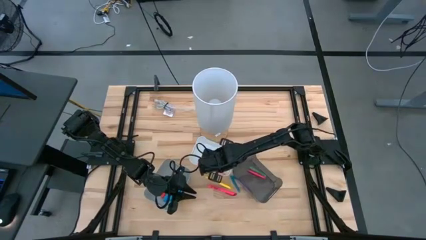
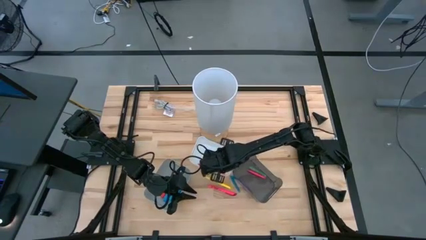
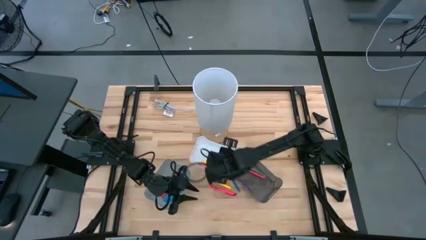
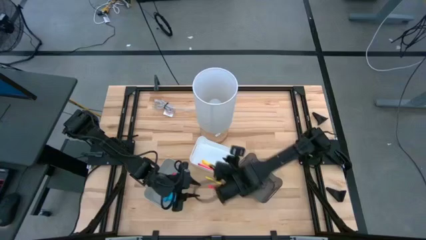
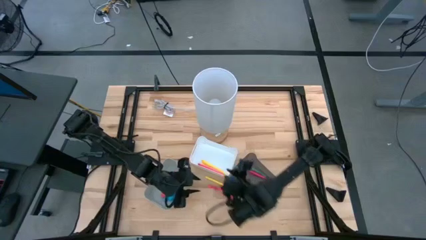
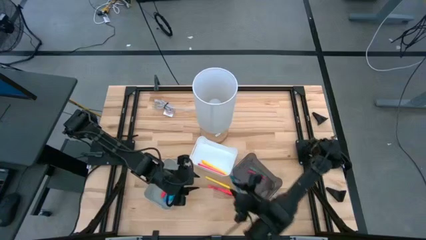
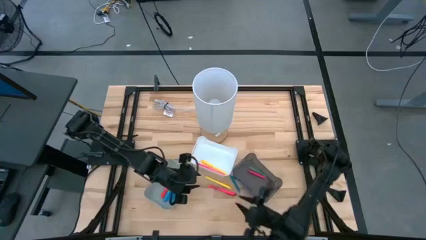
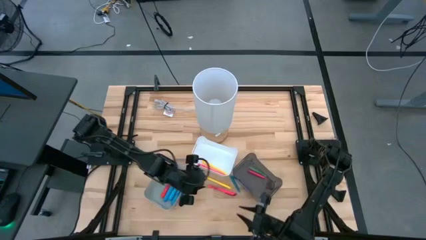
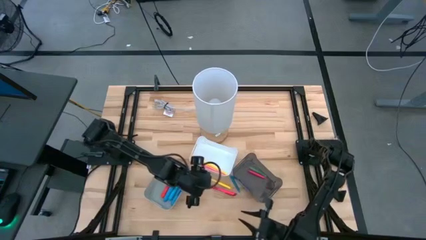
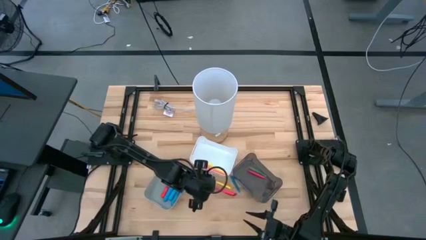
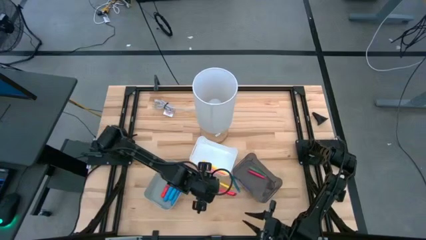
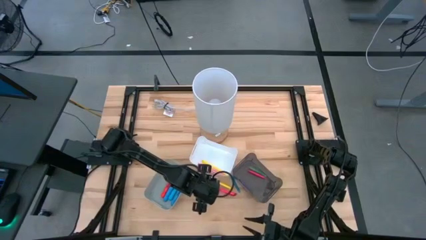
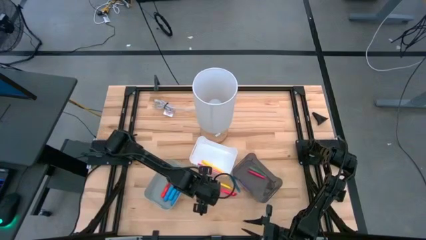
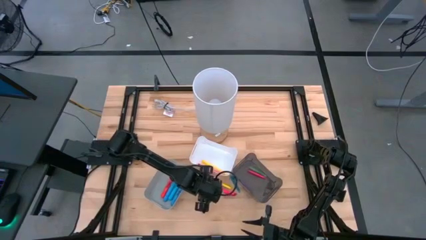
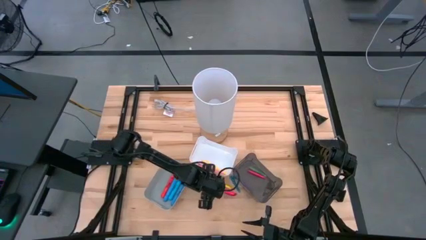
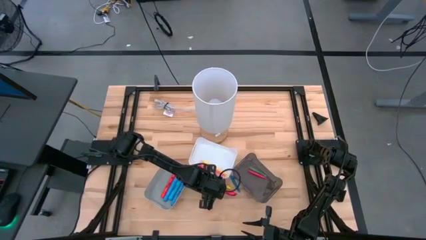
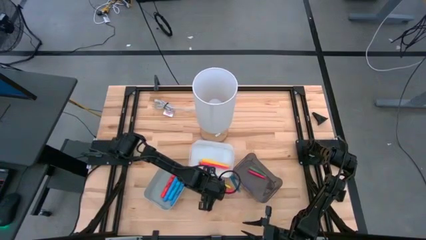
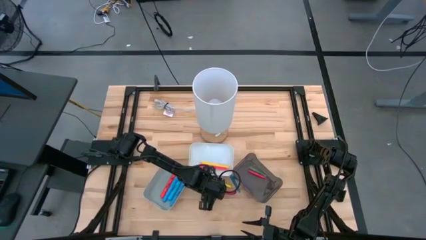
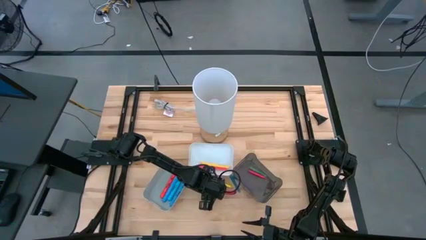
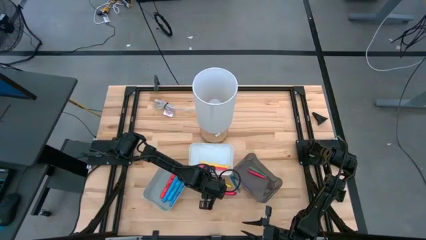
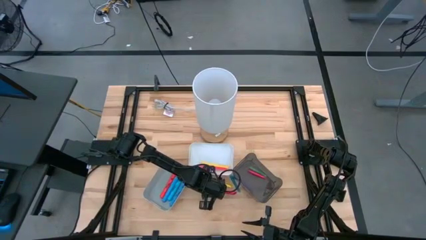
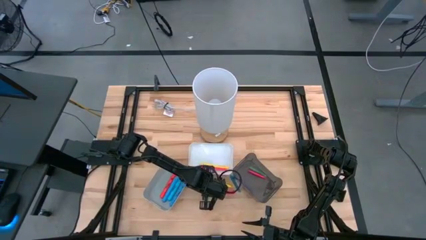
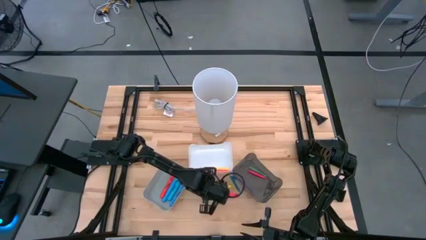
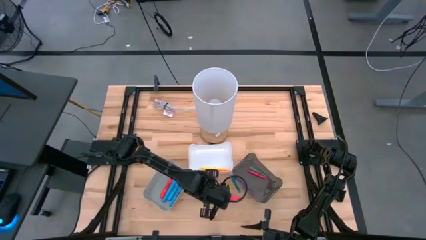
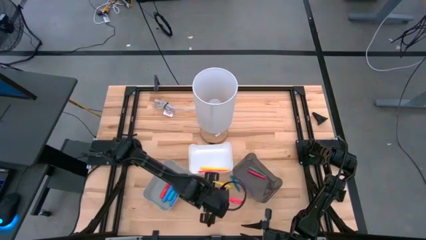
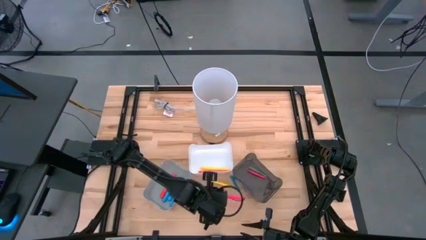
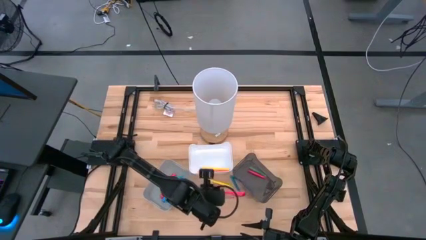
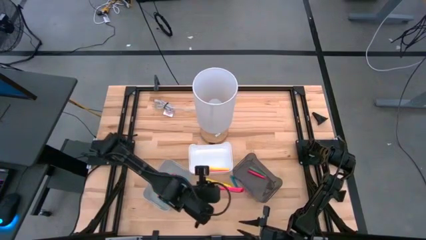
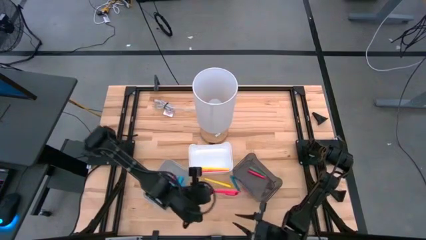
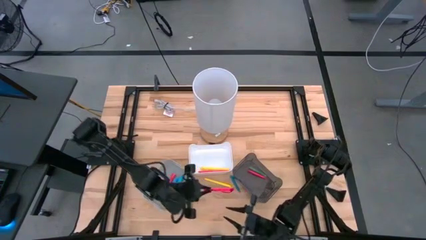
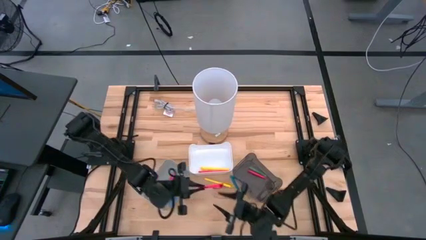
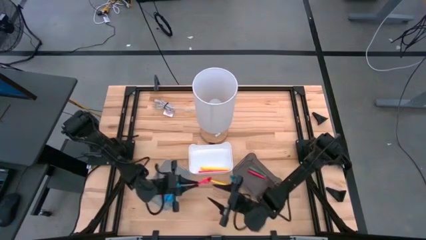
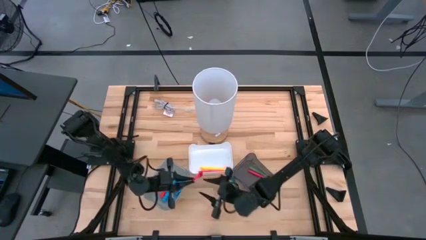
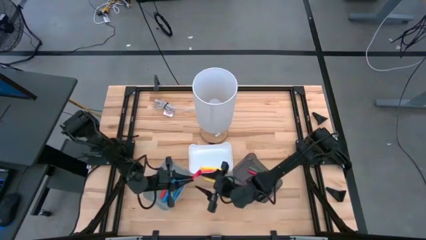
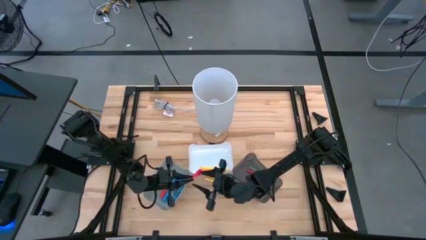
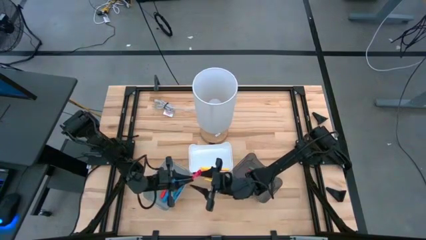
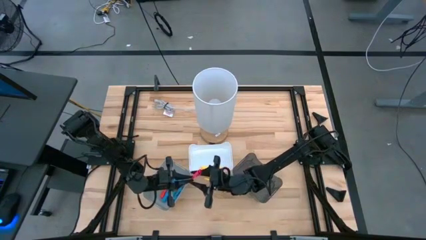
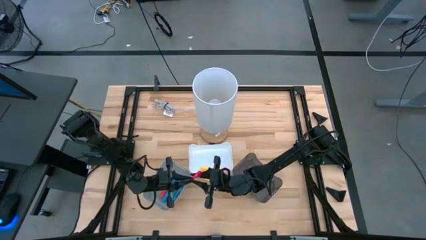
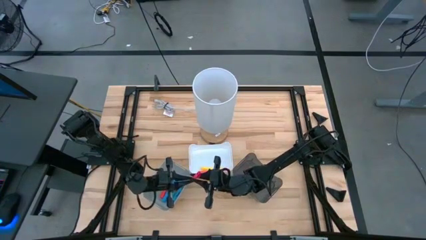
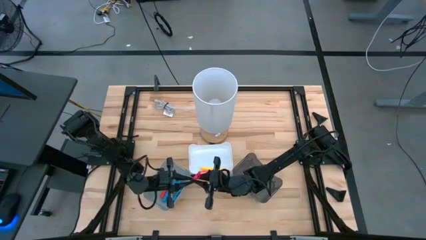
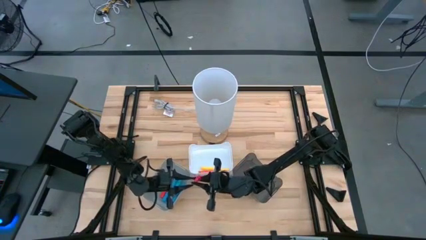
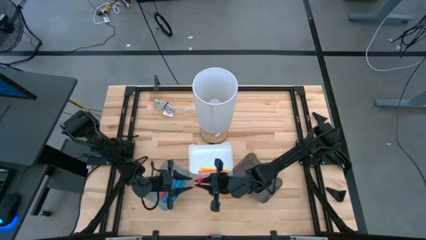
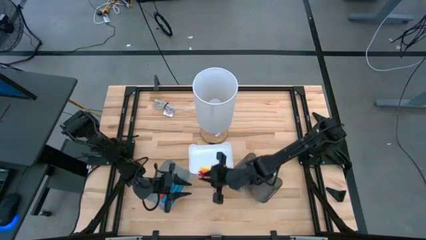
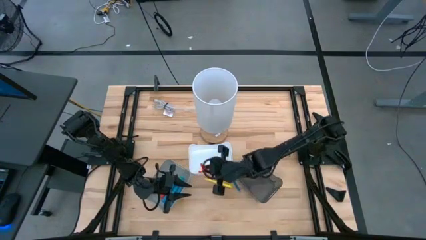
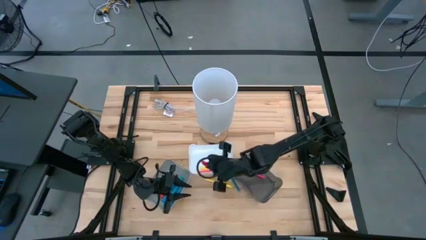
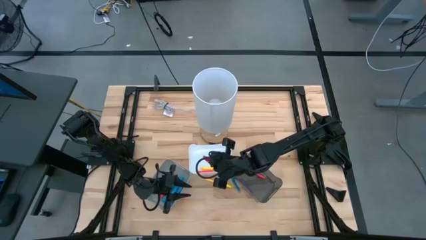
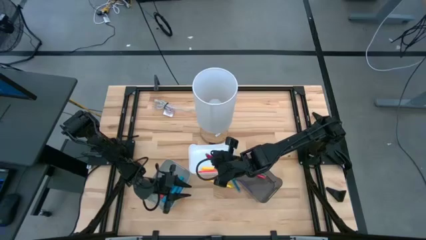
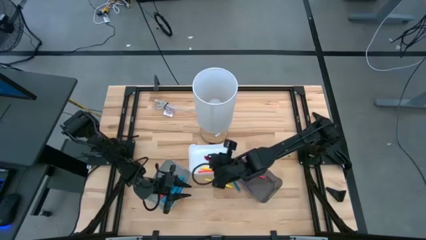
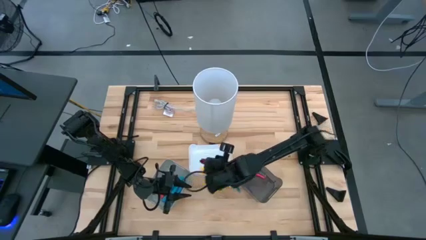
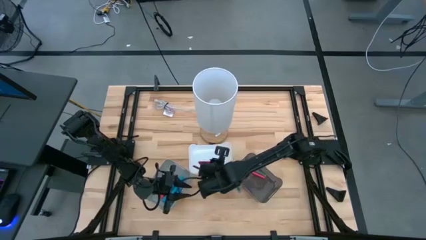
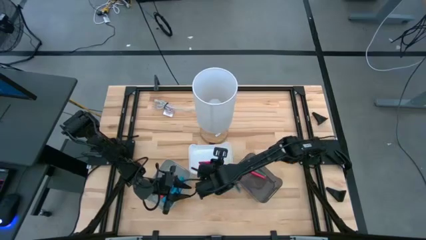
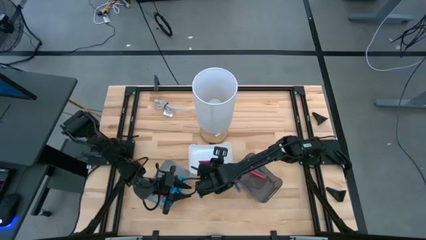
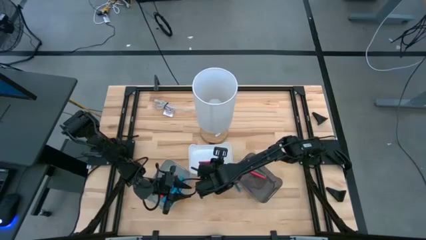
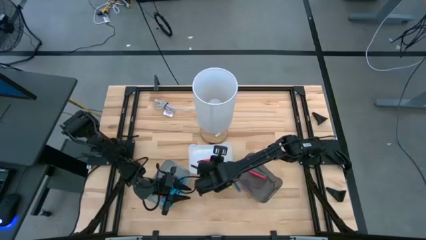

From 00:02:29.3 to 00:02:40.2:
Task: Pick & Place Markers
Put the pink marker pen in the white bin

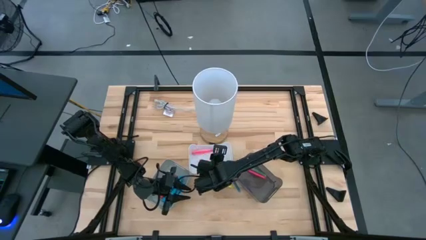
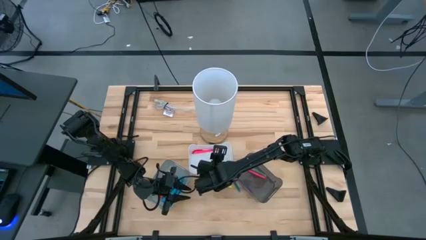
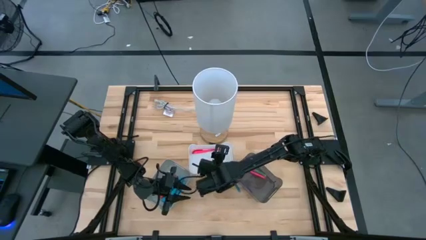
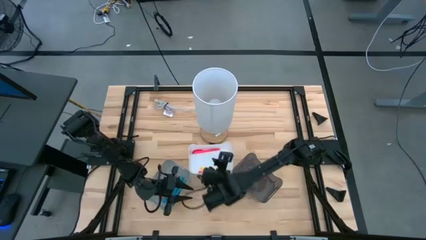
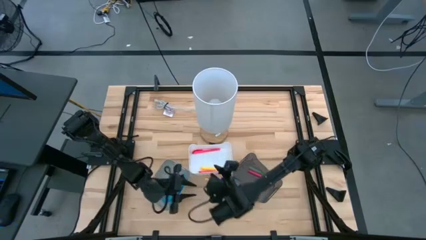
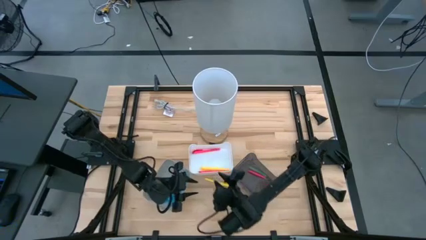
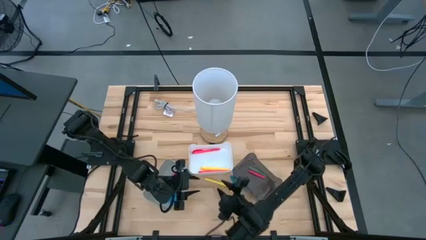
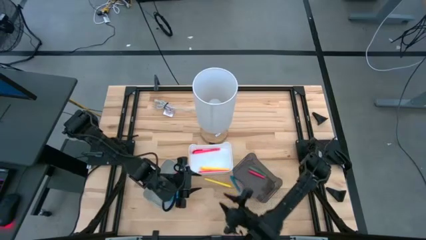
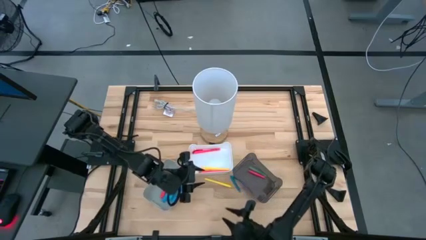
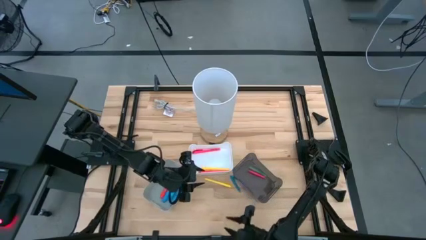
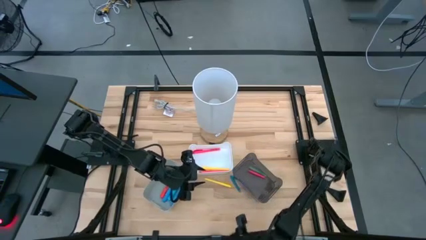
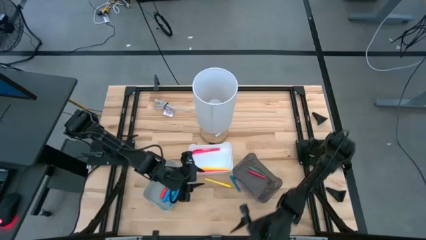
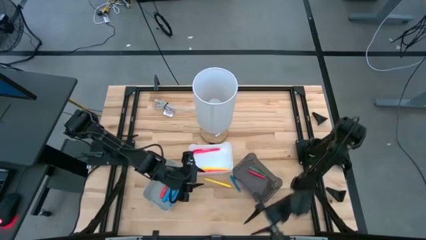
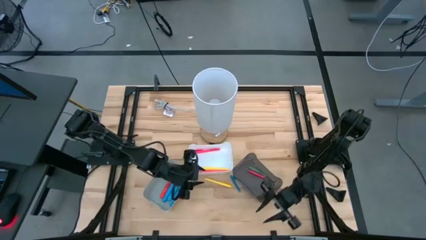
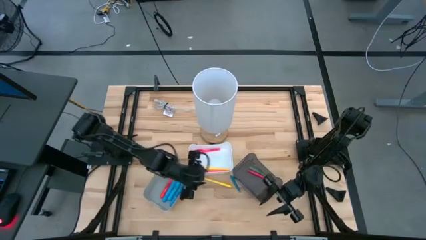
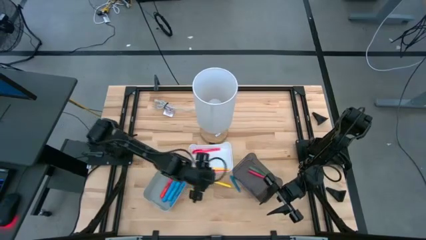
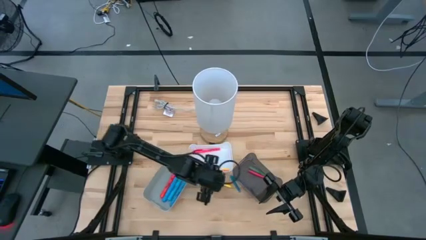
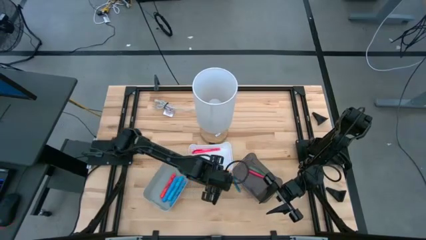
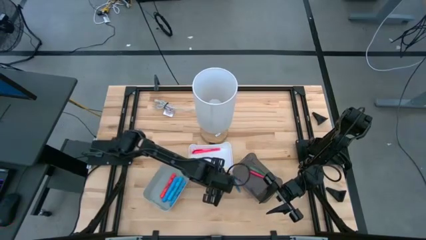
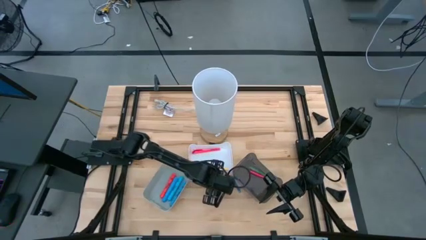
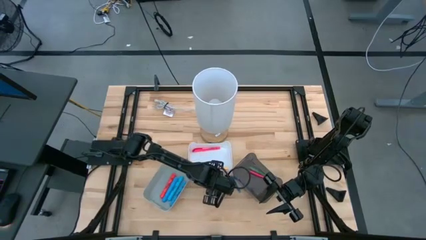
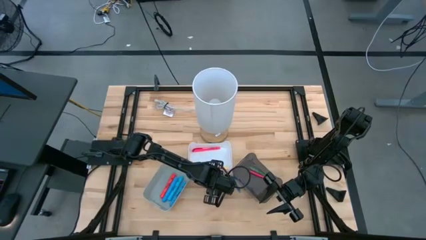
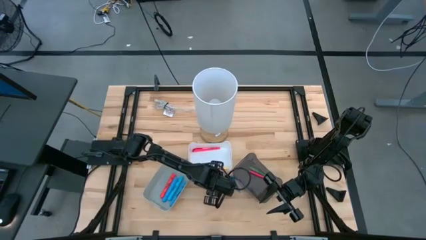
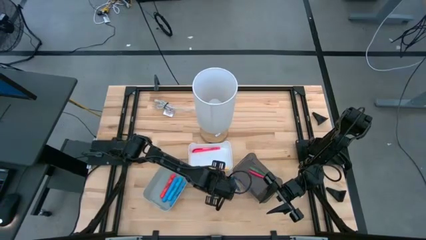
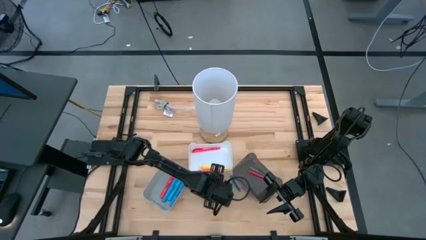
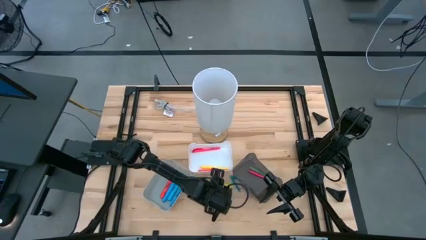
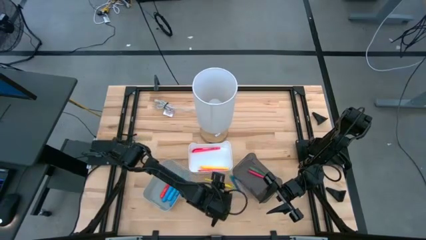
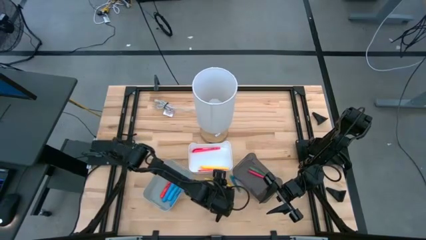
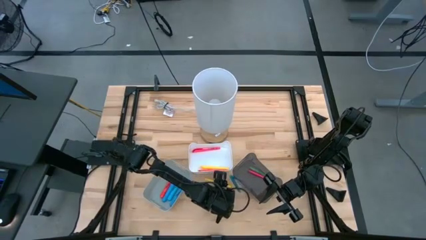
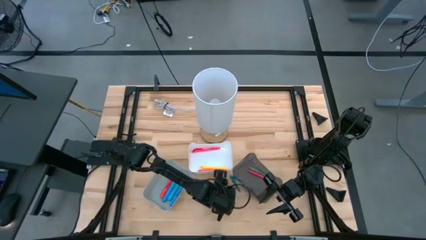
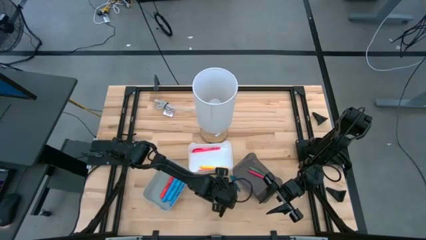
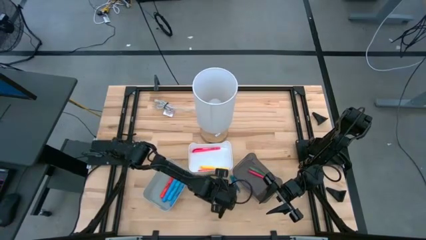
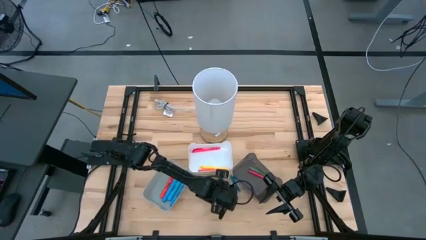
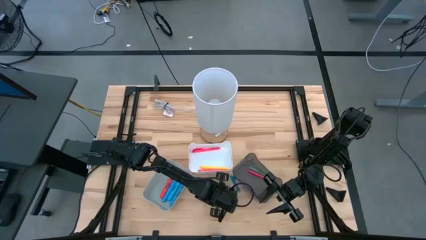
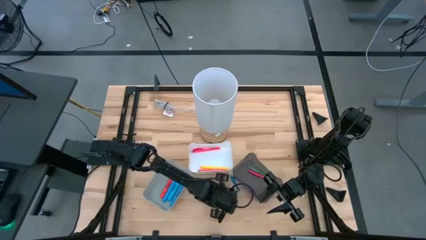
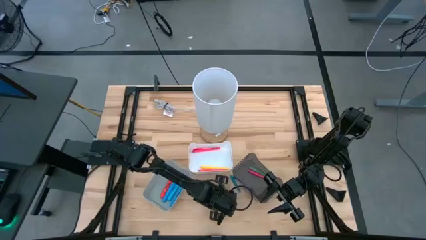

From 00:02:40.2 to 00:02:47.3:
Put the yellow marker pen in the white bin
